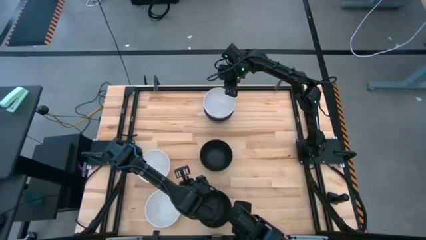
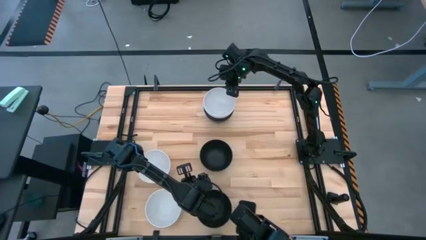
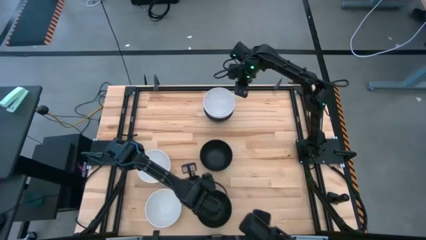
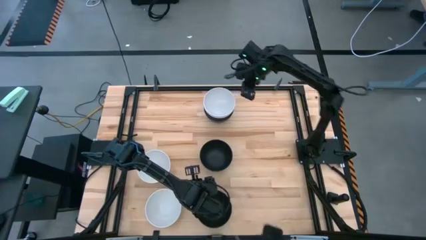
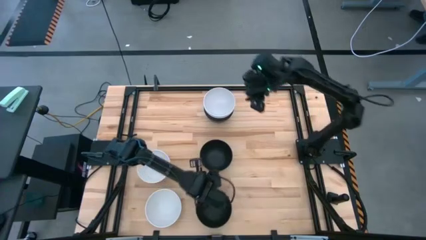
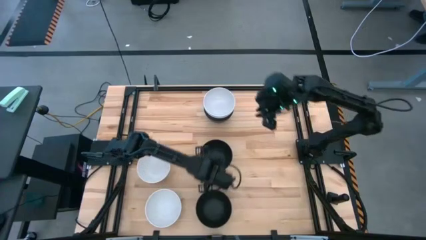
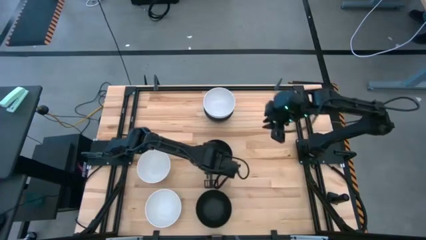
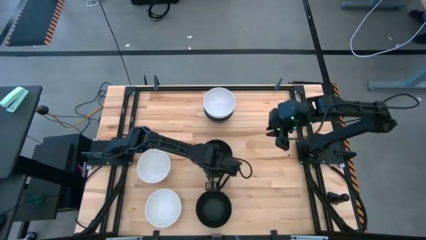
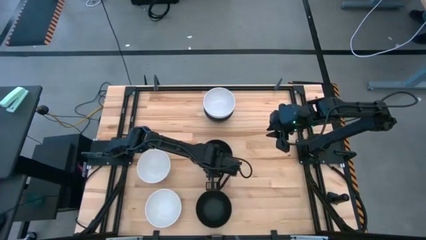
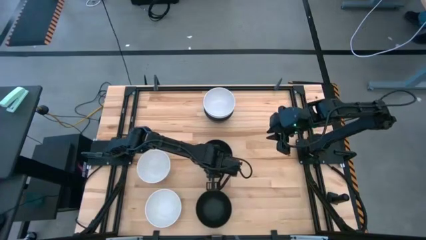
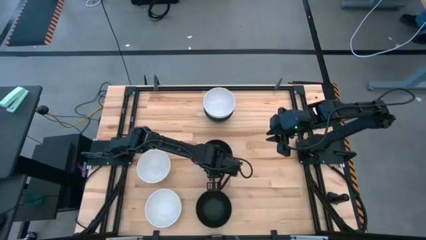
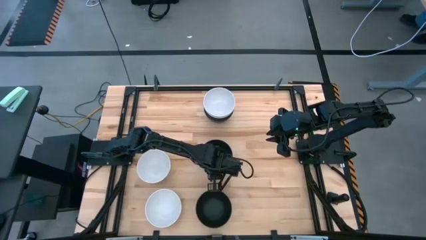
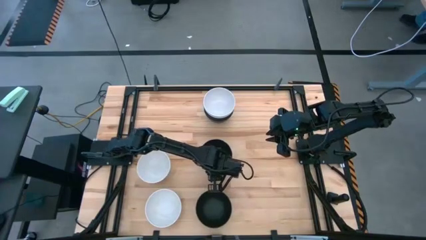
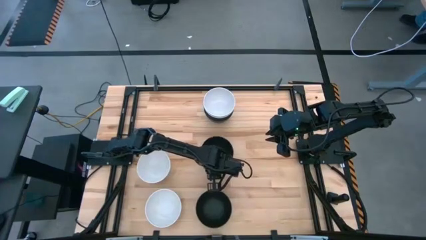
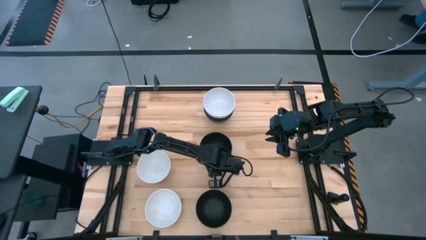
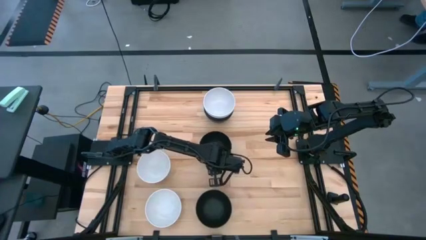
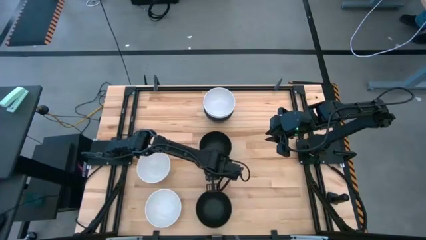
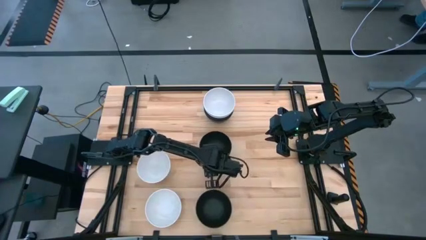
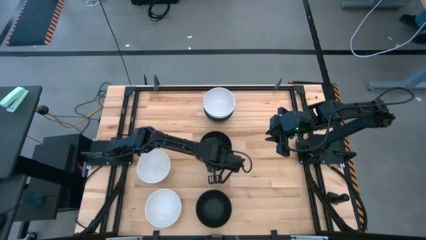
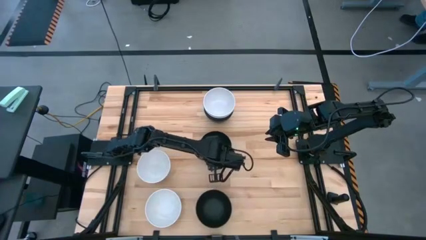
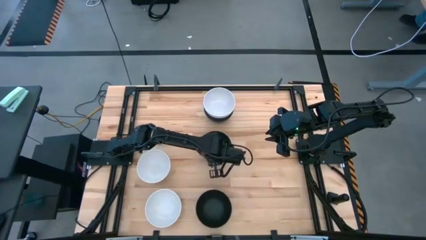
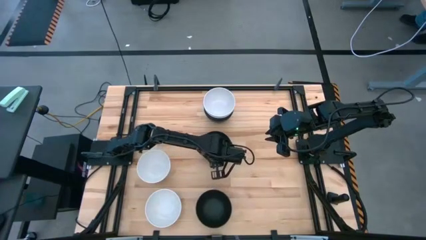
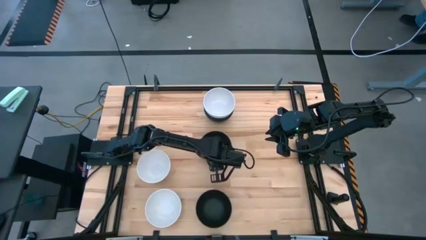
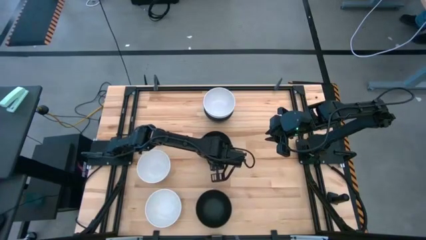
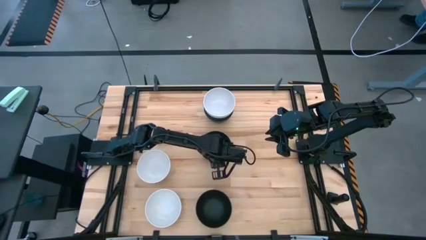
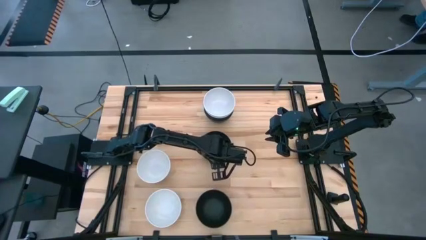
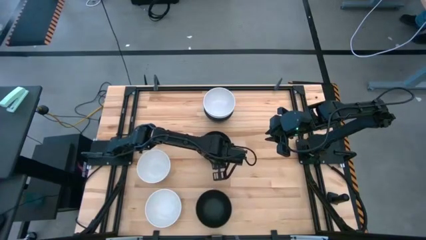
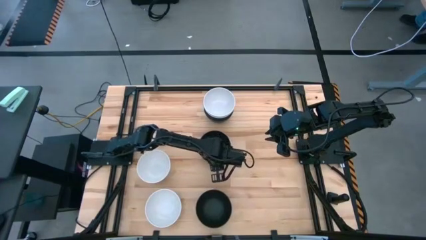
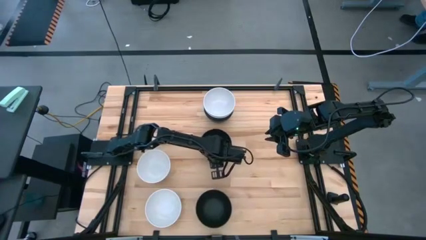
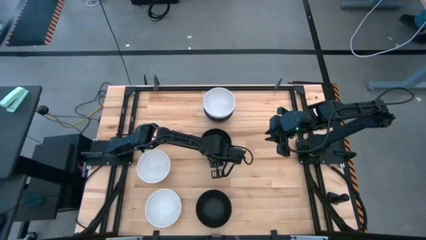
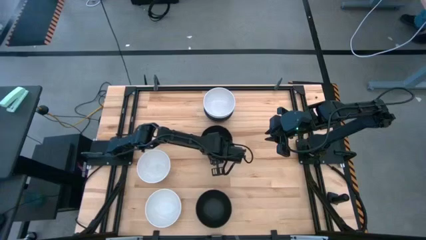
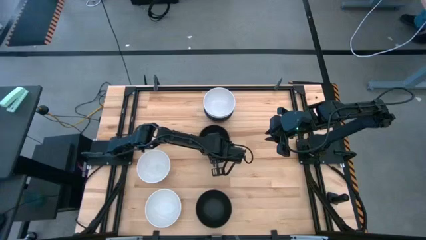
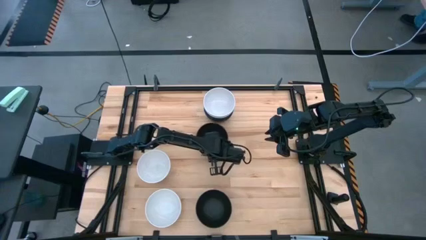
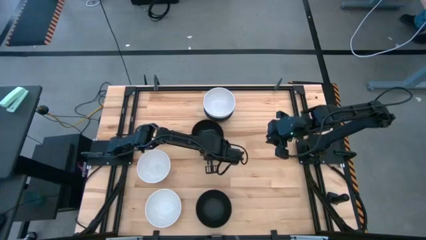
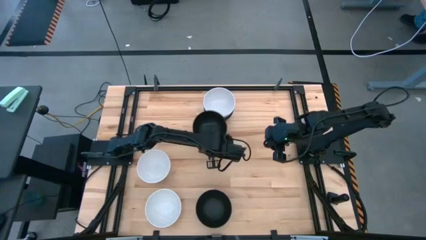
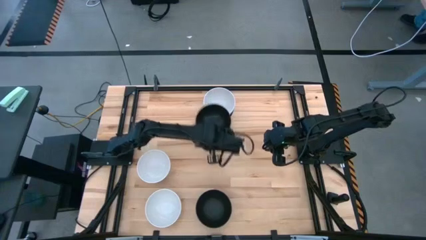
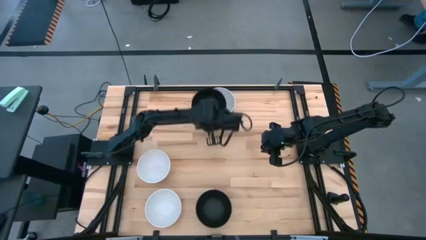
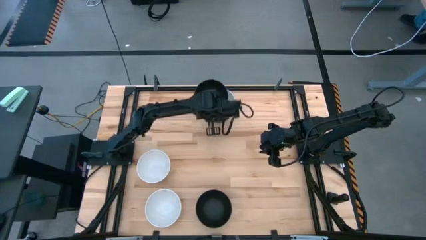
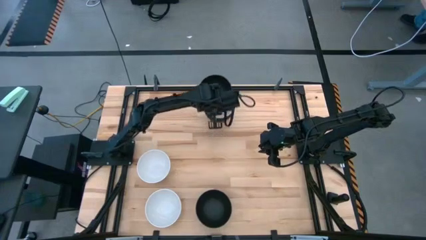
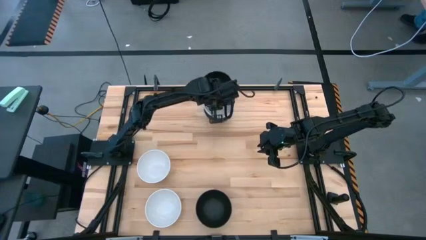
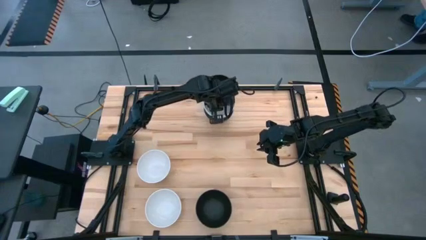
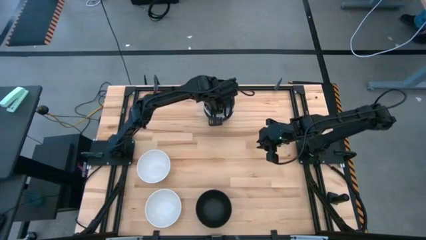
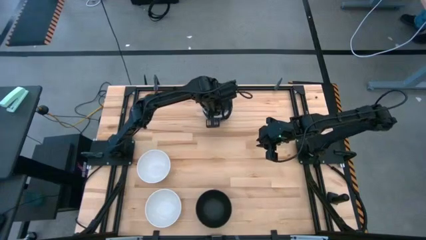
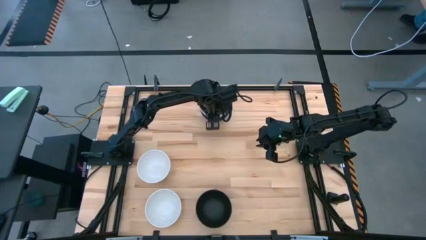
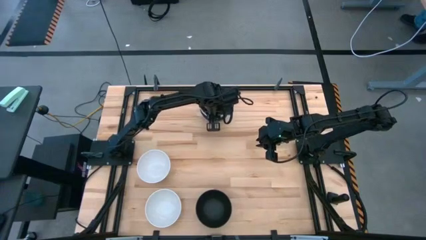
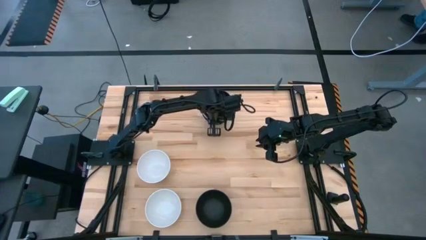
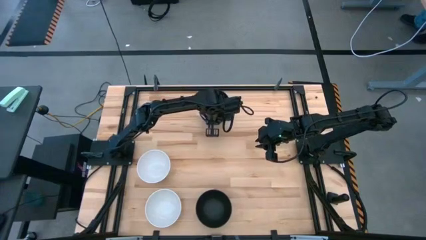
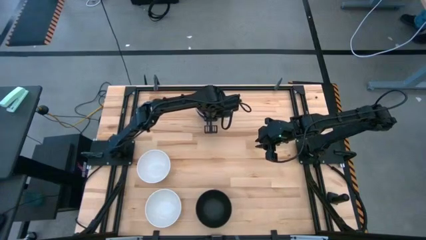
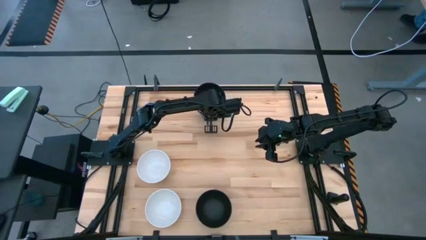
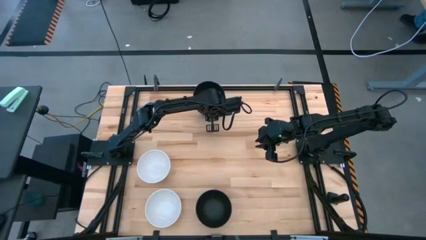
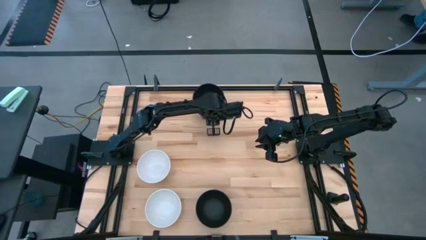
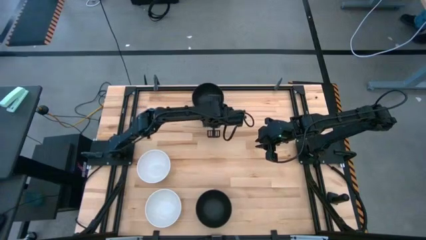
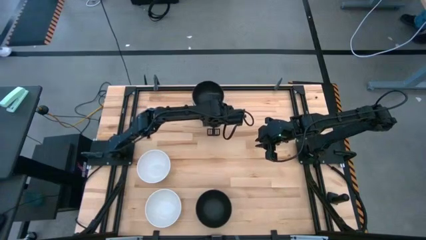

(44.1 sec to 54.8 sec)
Task: Nest bowls inside each other
Stack the black bowl on top of the stacked white bowls

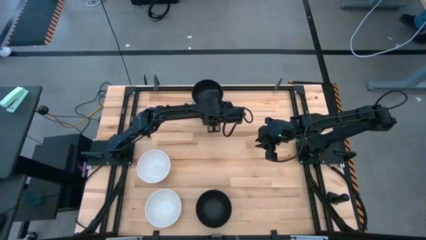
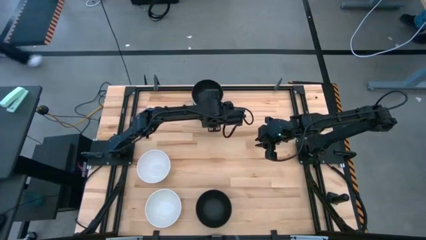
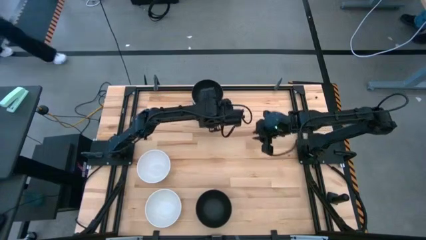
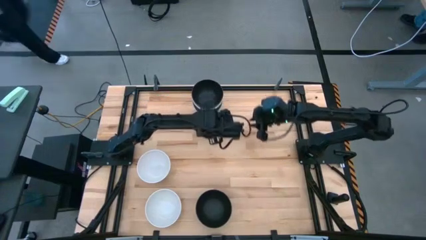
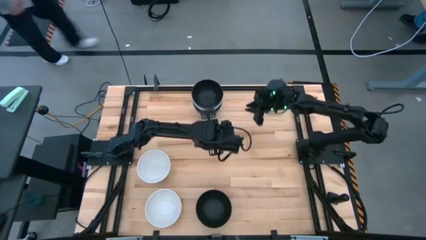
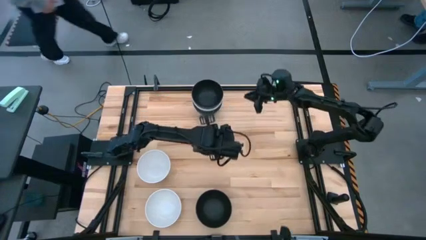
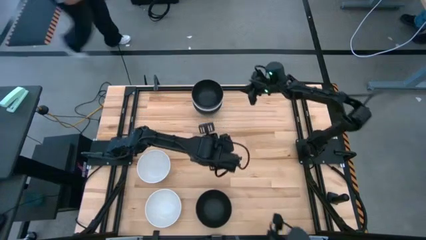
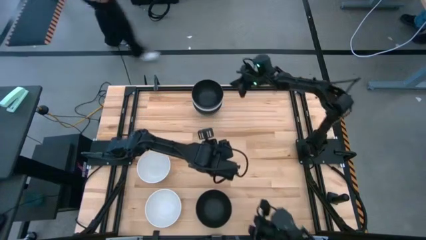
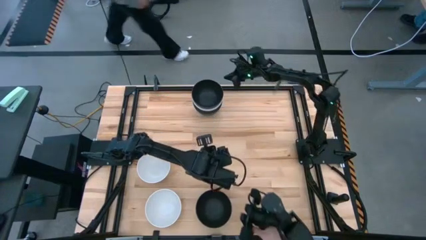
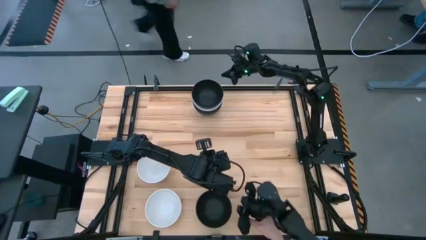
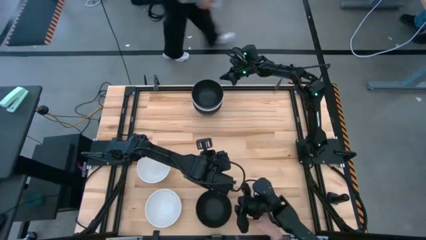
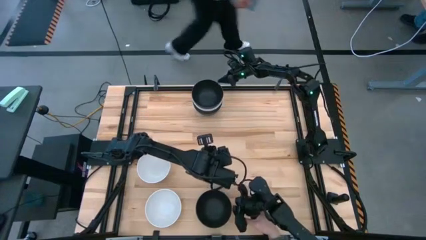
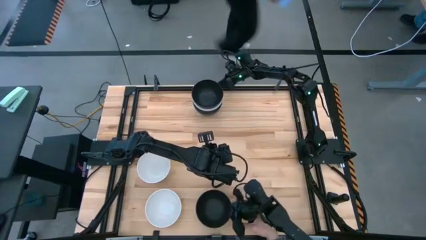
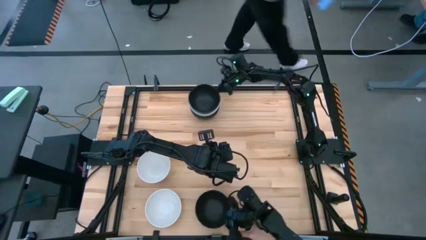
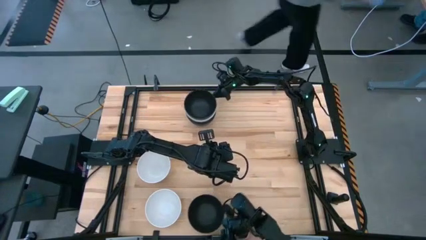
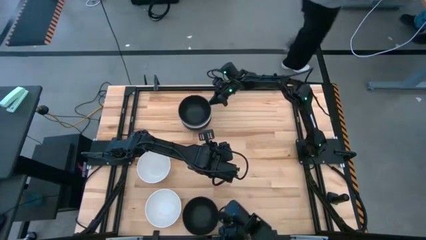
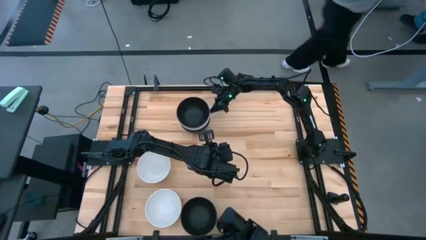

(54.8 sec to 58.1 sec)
Adjust the stacked bowls
